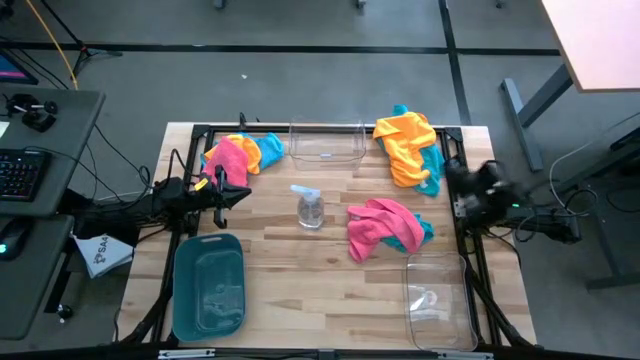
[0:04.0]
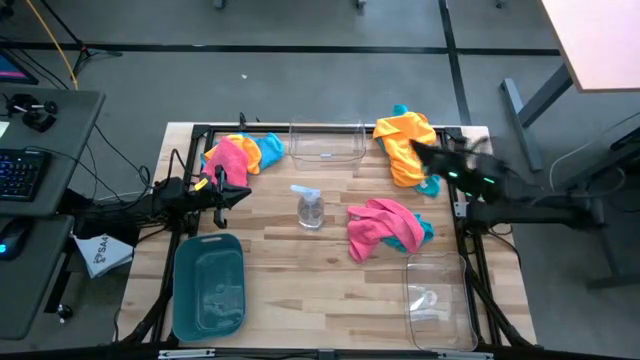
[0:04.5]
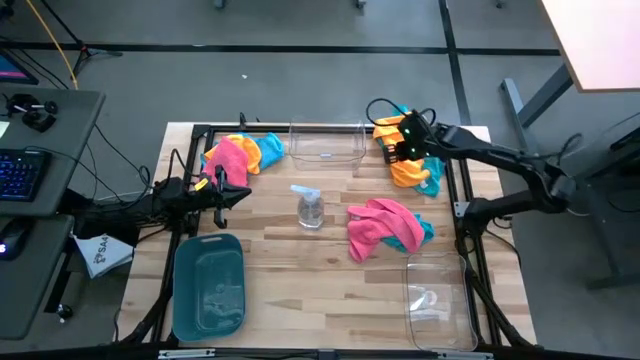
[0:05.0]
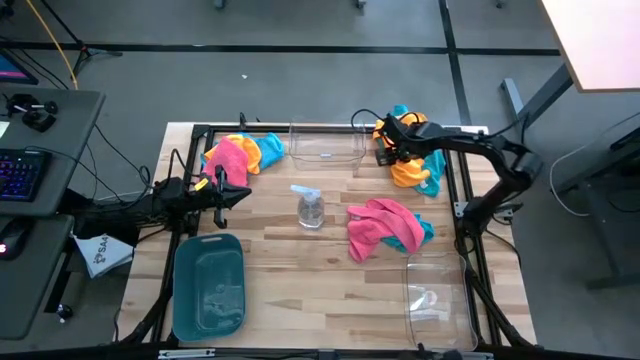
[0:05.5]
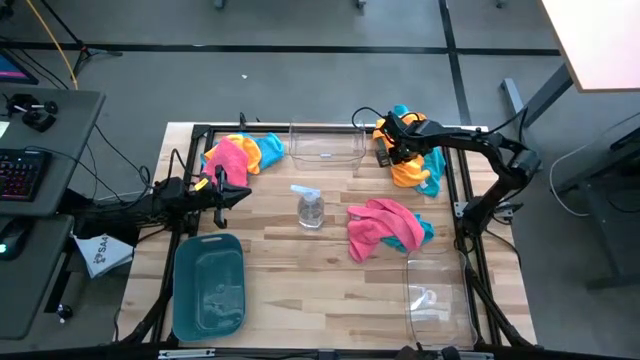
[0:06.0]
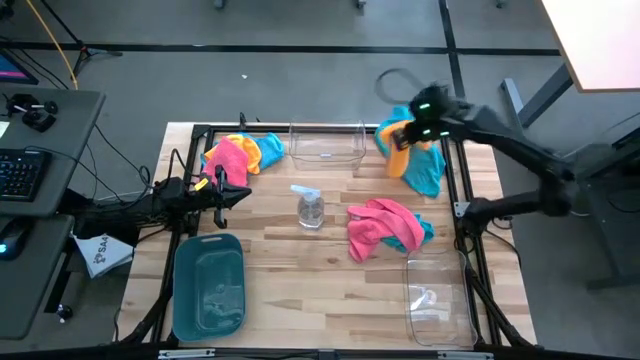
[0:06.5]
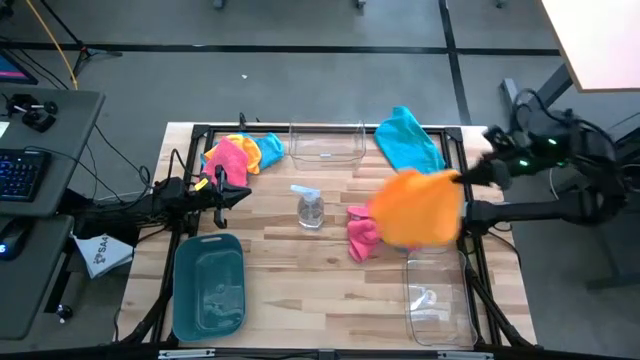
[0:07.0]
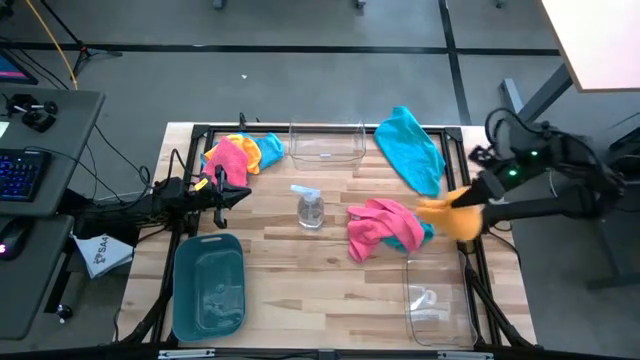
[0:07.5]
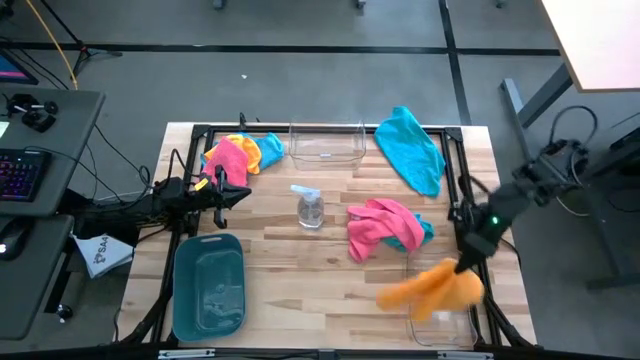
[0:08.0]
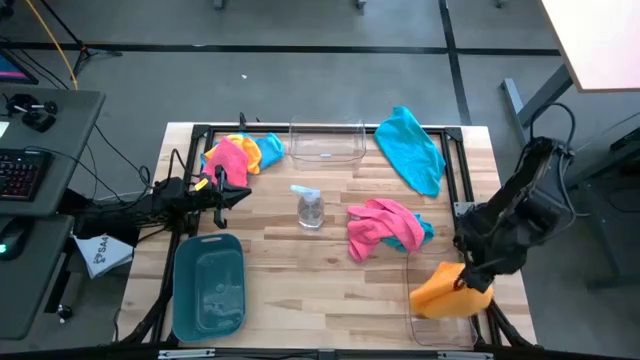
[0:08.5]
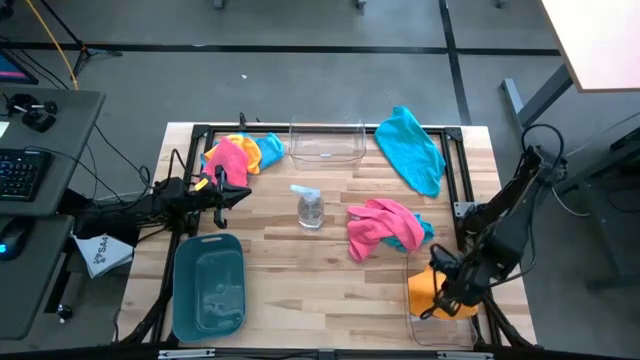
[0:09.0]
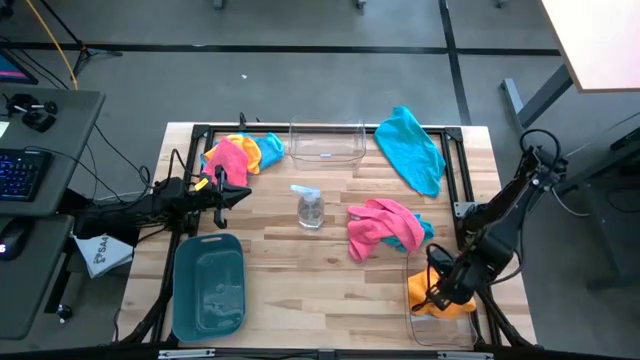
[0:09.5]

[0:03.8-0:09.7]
Task: Sort microfiber towel by color & place in baskets
Put the right yellow towel into the bottom transparent bin

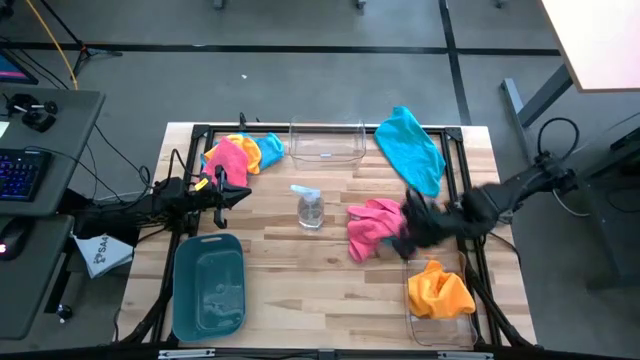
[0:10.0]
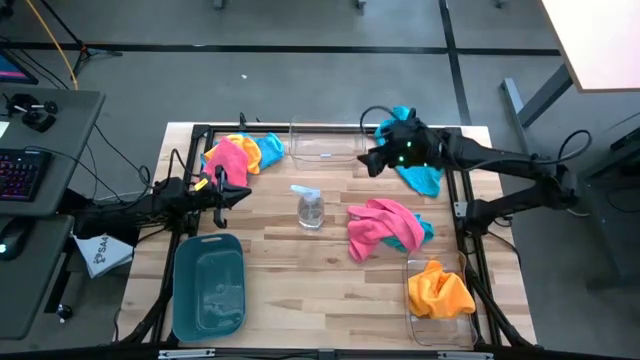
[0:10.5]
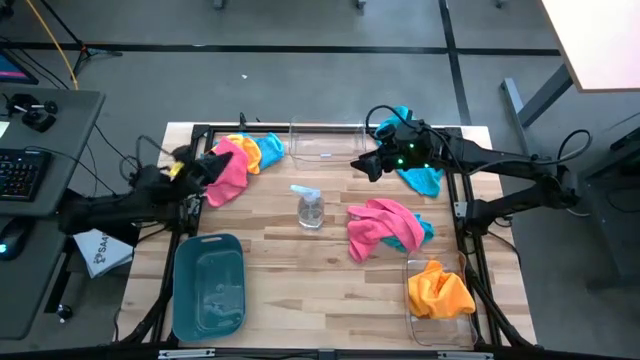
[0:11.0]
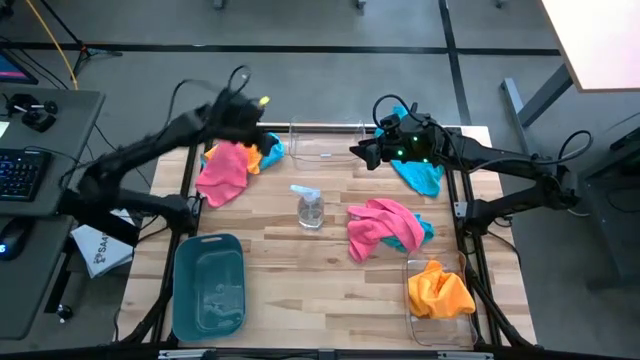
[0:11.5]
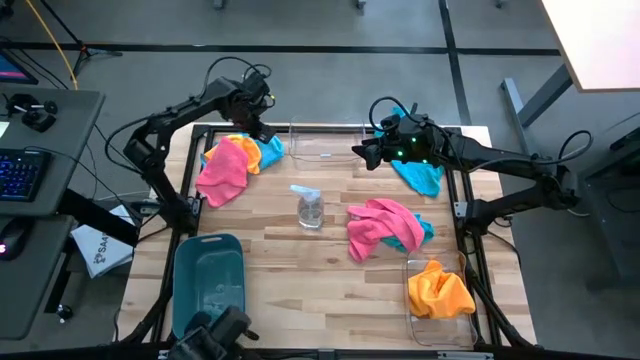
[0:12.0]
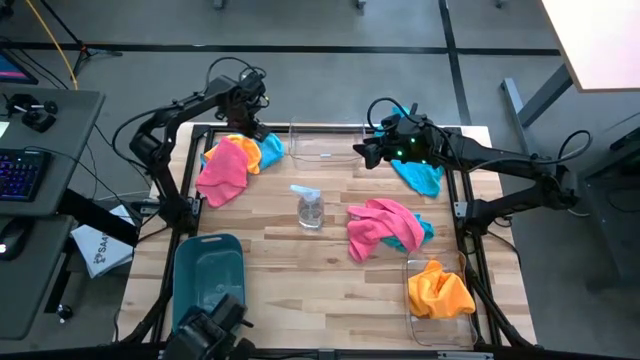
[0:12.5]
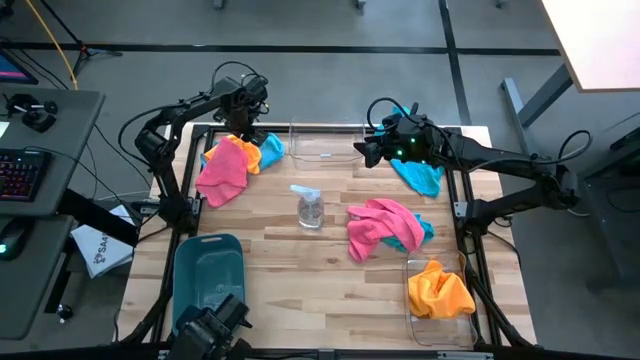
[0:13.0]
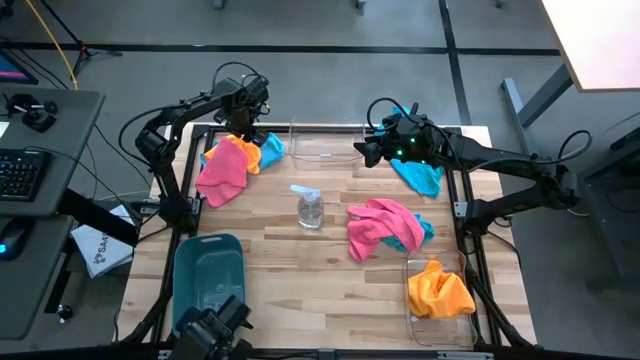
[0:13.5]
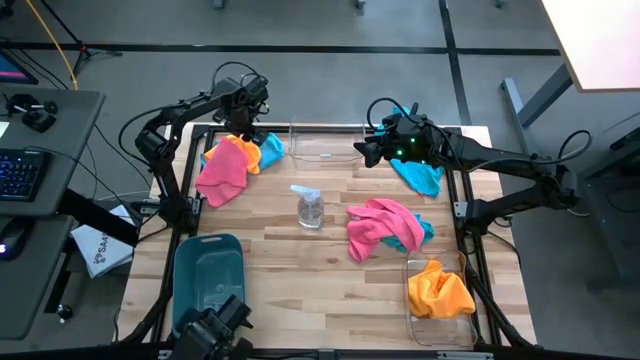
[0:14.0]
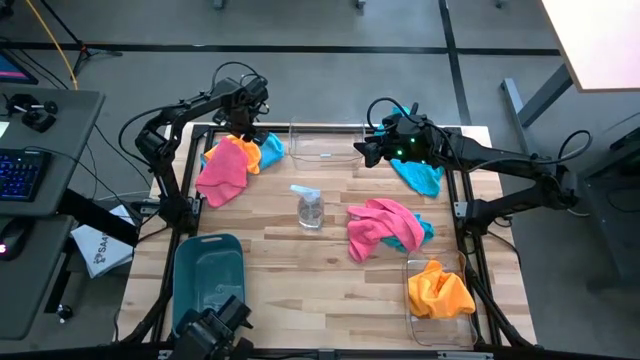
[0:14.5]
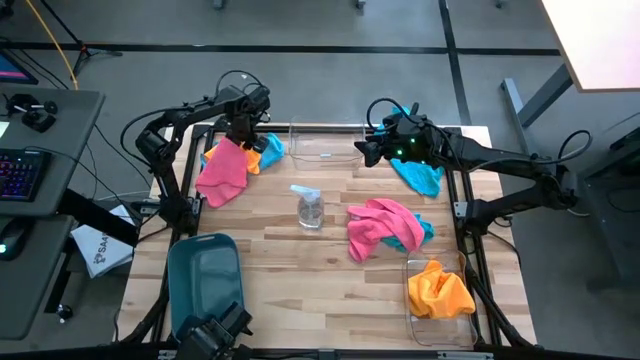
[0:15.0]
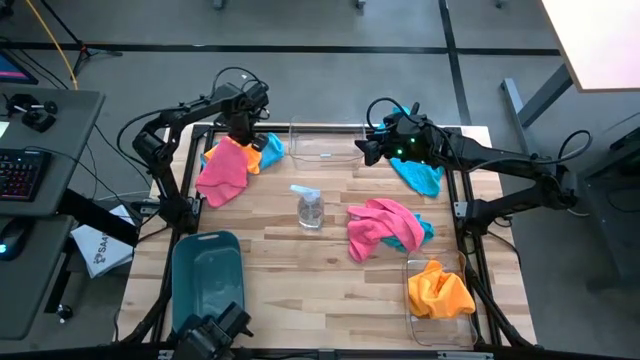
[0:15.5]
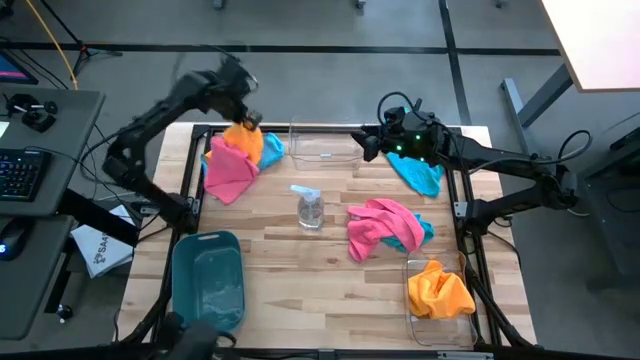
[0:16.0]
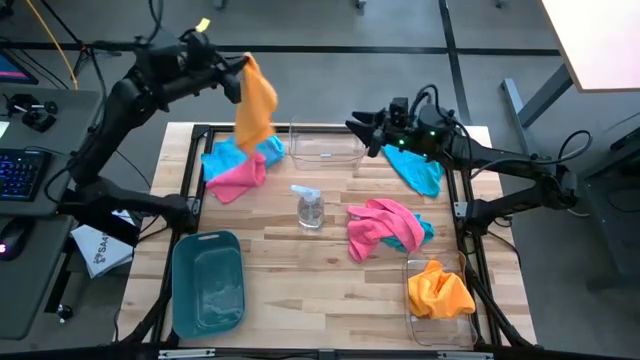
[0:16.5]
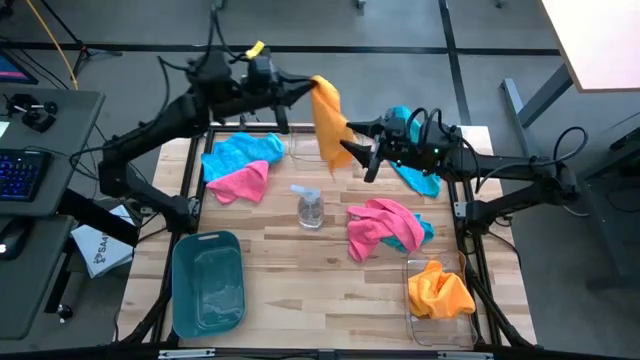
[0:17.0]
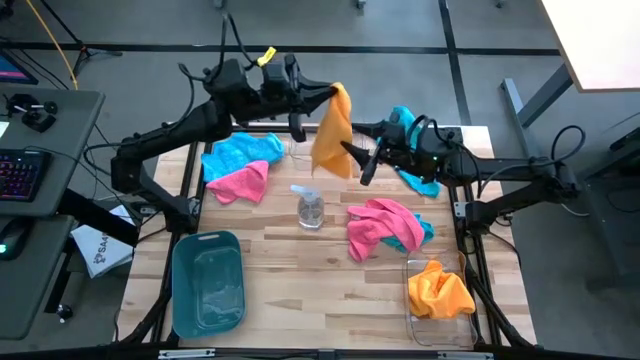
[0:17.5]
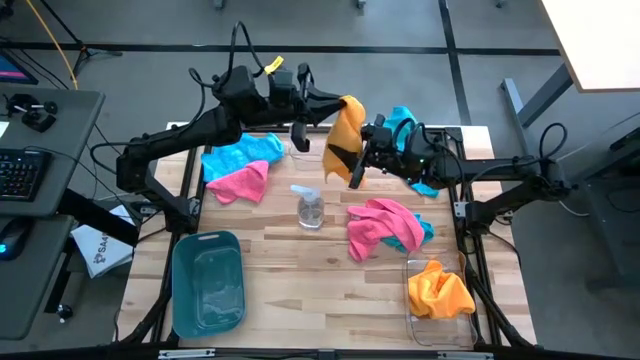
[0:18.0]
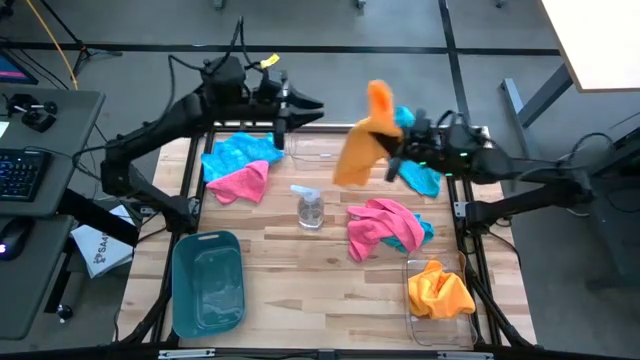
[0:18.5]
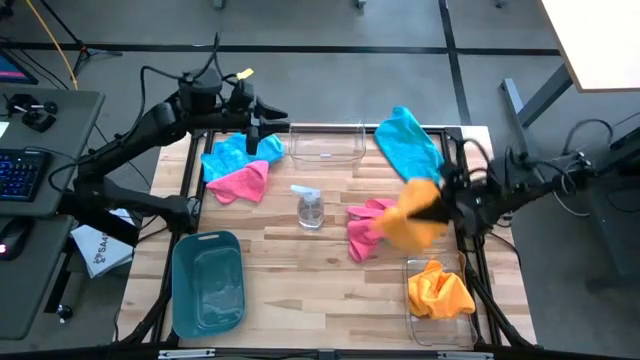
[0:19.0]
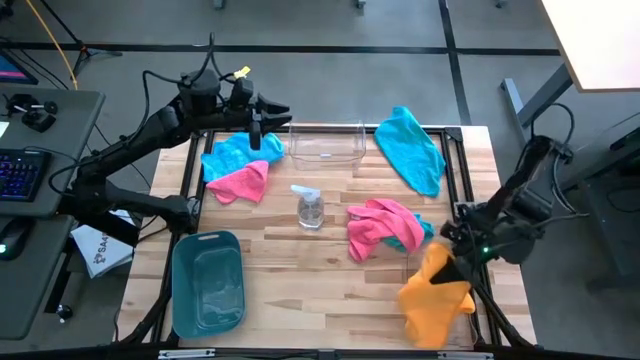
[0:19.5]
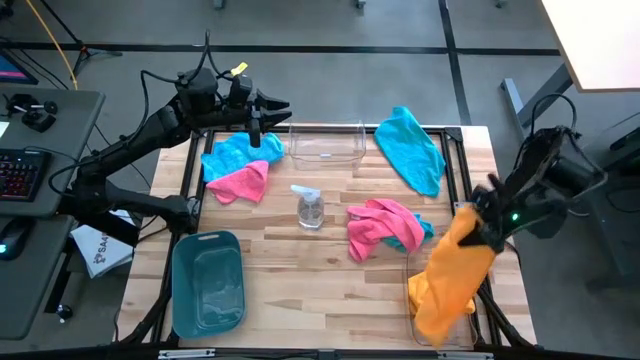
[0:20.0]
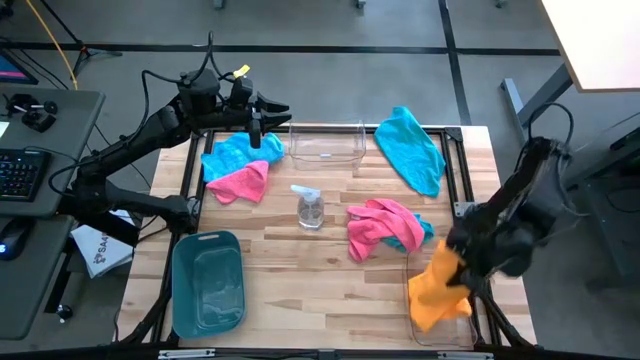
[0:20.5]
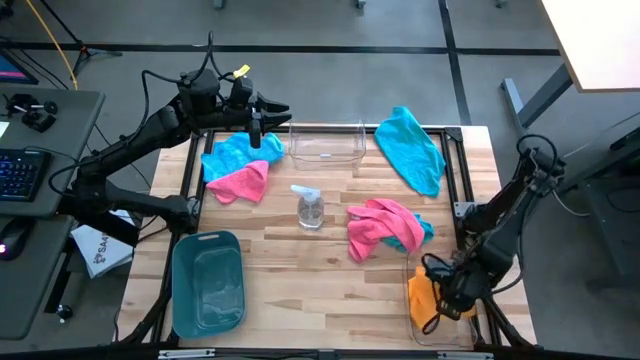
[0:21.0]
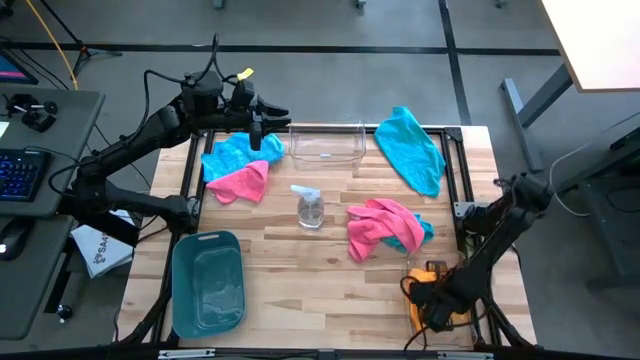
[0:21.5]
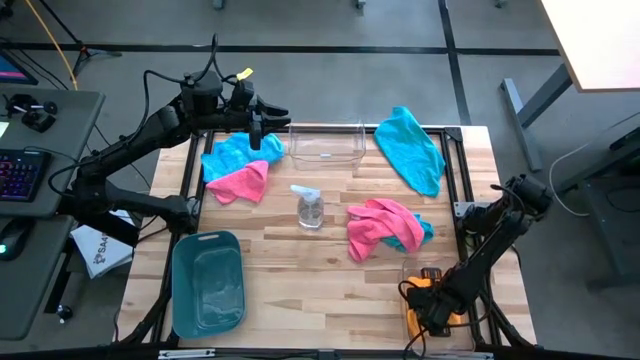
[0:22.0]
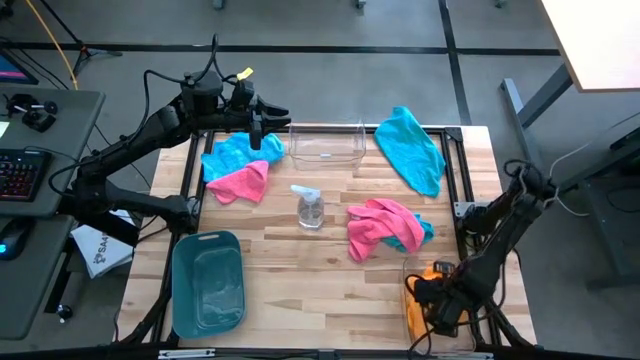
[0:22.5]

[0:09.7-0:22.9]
Put the yellow towel into the bottom transparent bin

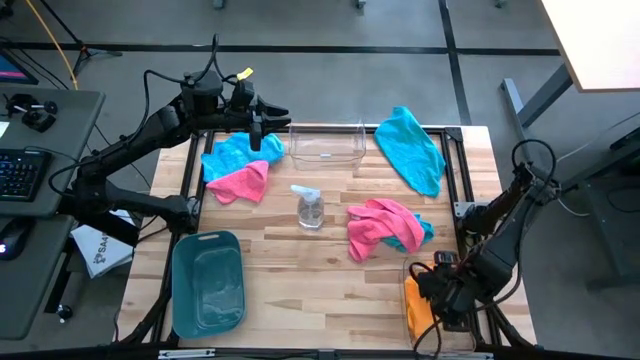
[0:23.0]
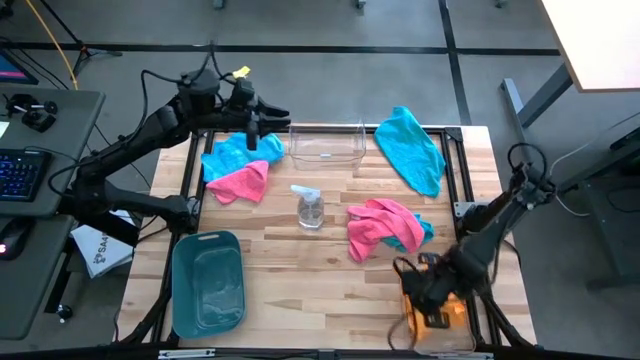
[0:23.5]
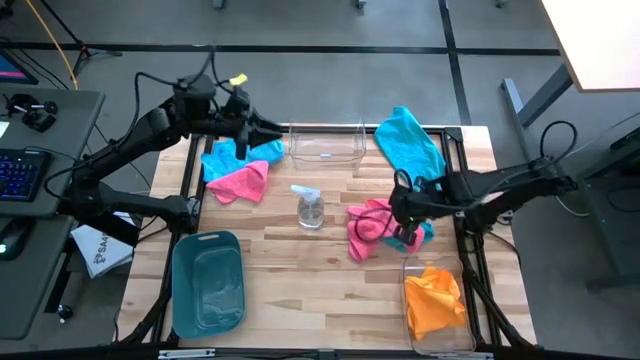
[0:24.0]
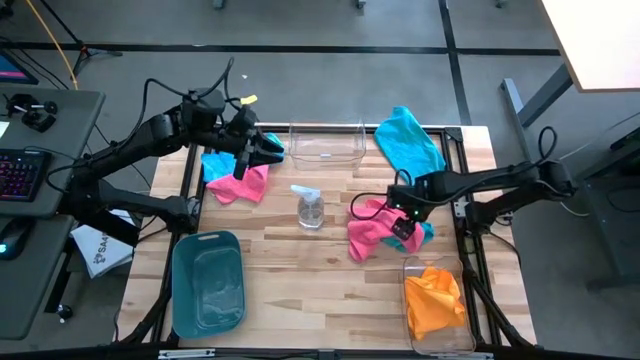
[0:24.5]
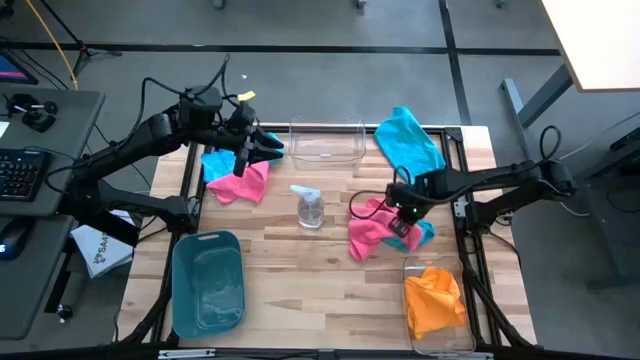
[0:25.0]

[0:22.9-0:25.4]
Put the right pink towel into the top transparent bin
